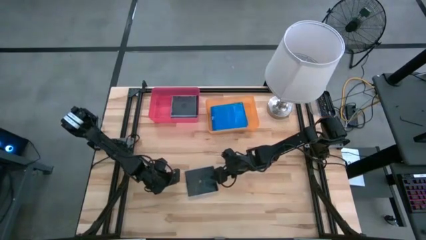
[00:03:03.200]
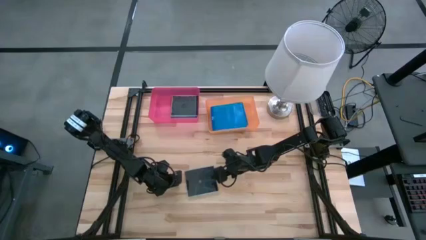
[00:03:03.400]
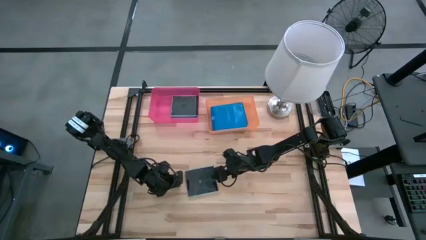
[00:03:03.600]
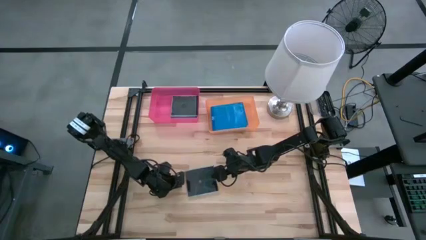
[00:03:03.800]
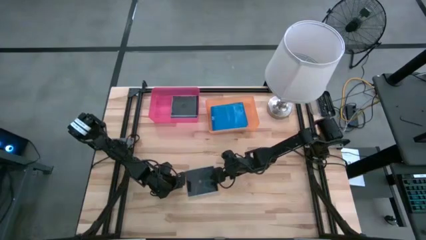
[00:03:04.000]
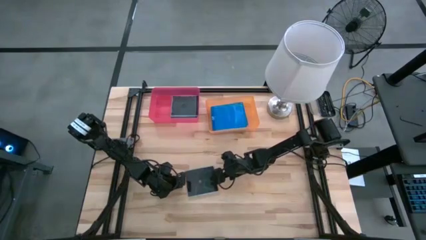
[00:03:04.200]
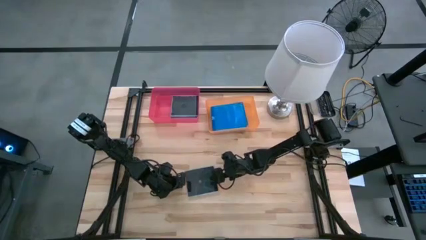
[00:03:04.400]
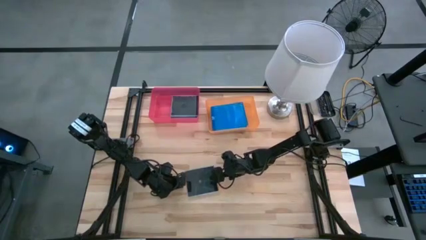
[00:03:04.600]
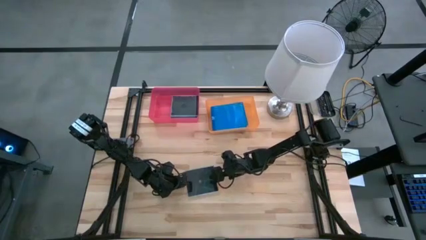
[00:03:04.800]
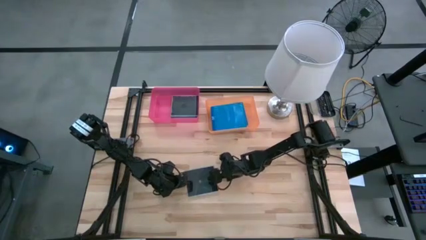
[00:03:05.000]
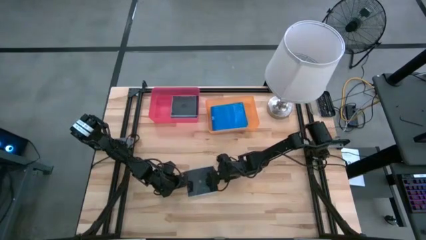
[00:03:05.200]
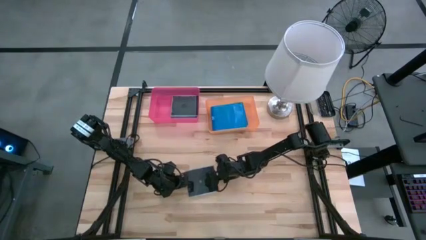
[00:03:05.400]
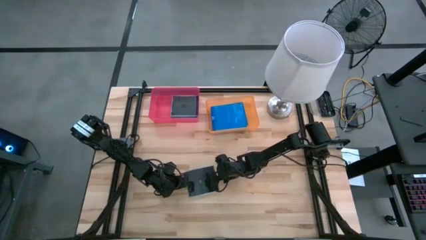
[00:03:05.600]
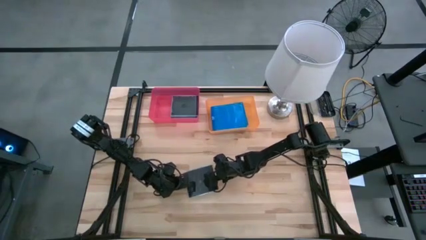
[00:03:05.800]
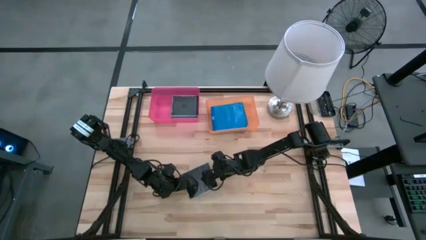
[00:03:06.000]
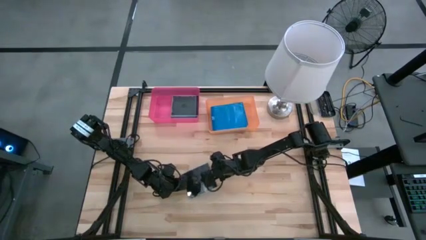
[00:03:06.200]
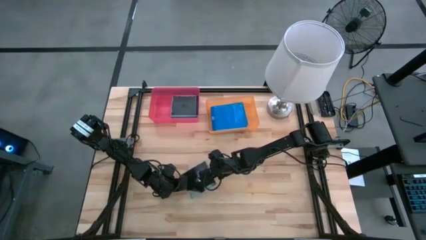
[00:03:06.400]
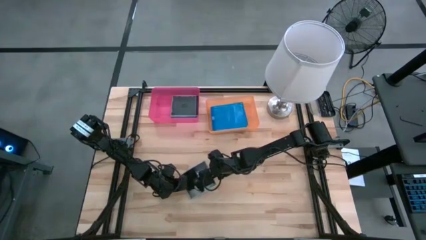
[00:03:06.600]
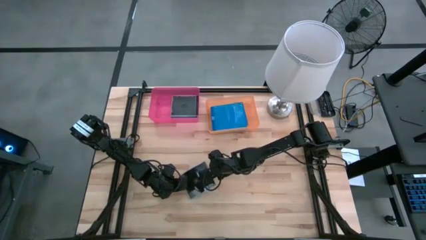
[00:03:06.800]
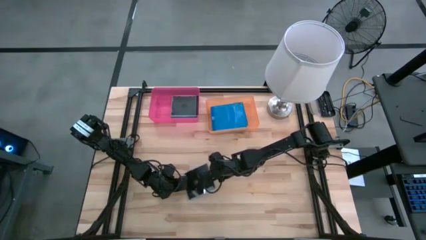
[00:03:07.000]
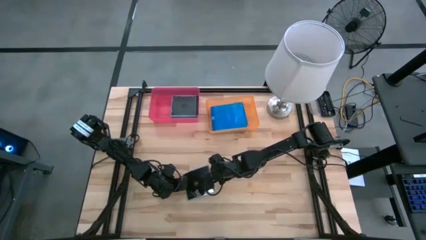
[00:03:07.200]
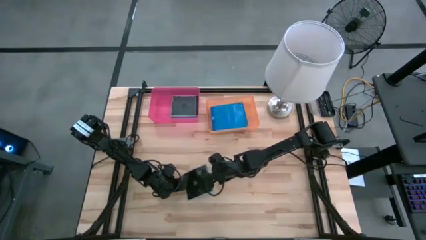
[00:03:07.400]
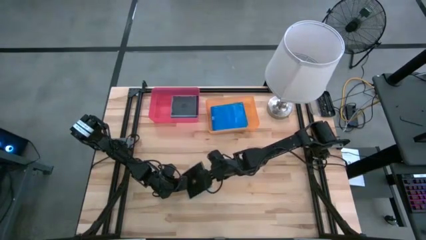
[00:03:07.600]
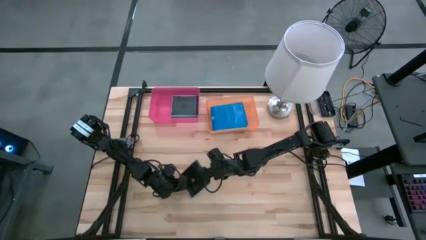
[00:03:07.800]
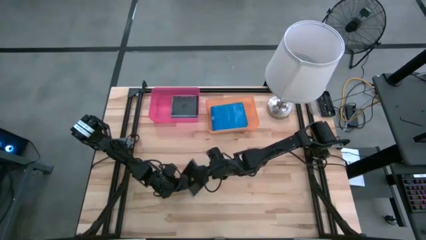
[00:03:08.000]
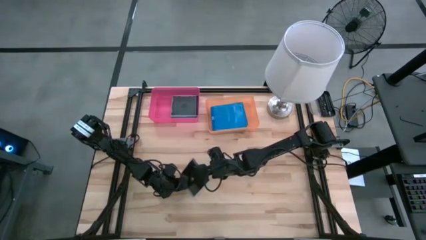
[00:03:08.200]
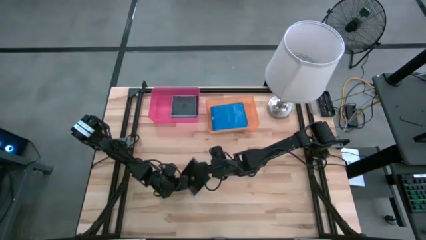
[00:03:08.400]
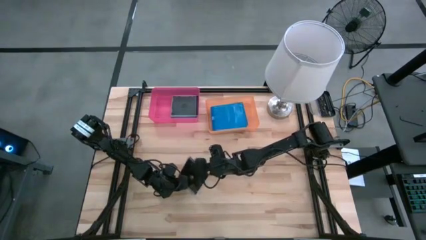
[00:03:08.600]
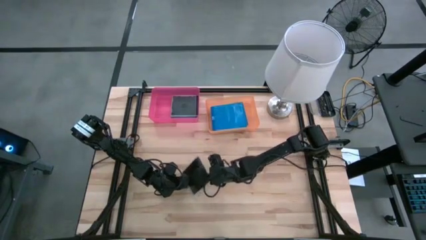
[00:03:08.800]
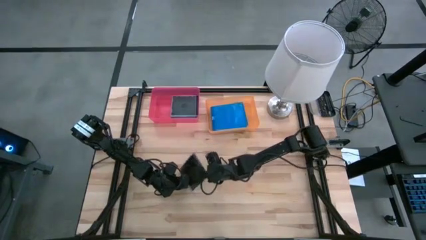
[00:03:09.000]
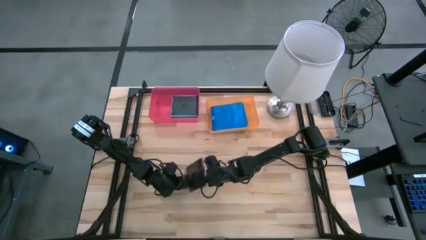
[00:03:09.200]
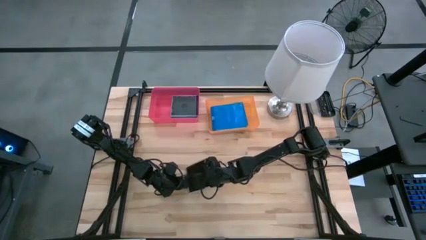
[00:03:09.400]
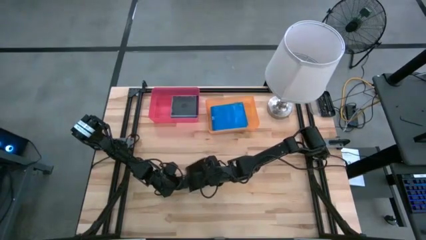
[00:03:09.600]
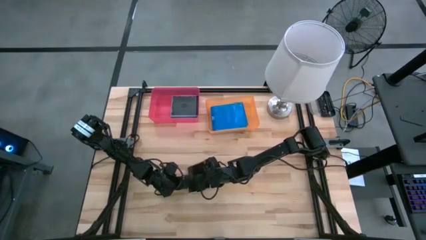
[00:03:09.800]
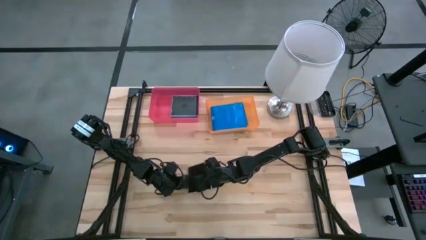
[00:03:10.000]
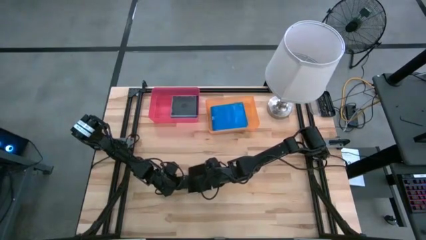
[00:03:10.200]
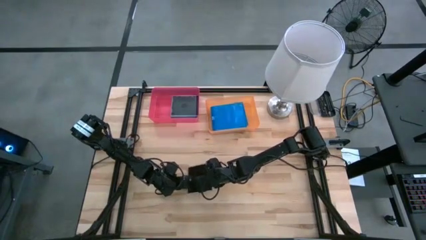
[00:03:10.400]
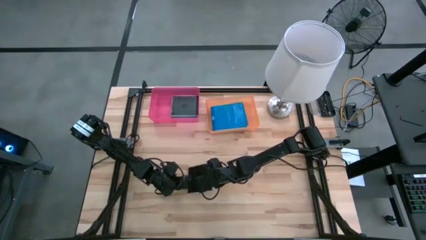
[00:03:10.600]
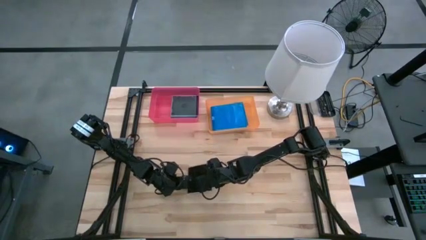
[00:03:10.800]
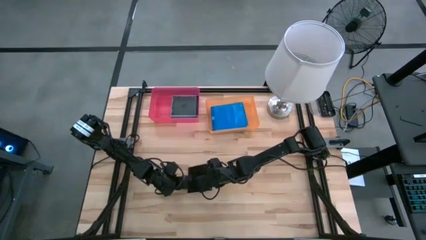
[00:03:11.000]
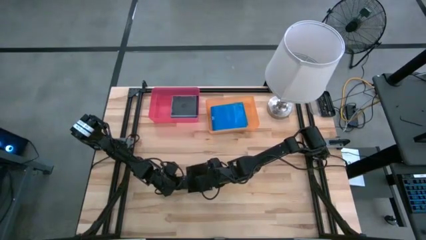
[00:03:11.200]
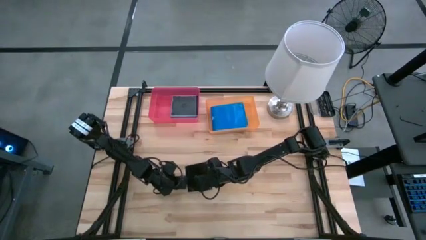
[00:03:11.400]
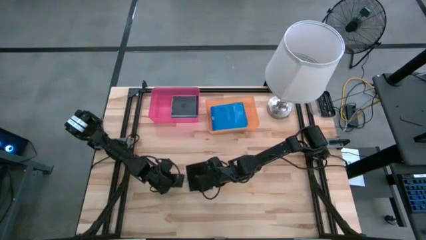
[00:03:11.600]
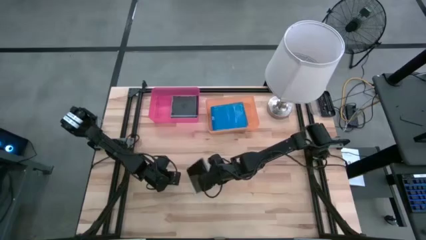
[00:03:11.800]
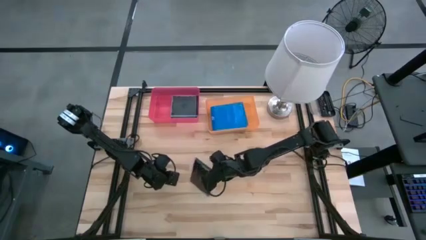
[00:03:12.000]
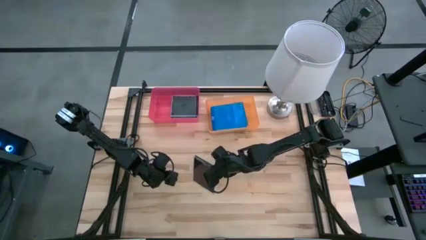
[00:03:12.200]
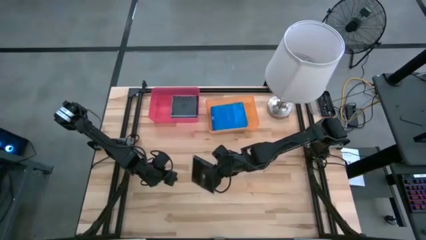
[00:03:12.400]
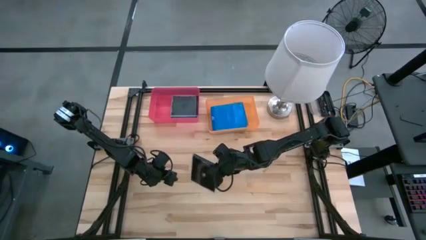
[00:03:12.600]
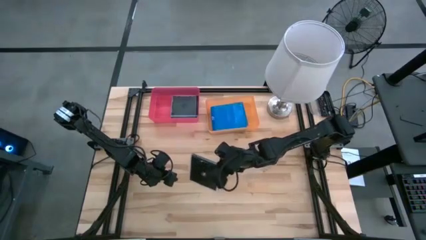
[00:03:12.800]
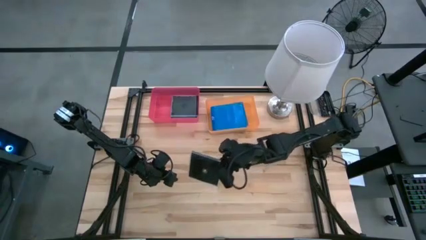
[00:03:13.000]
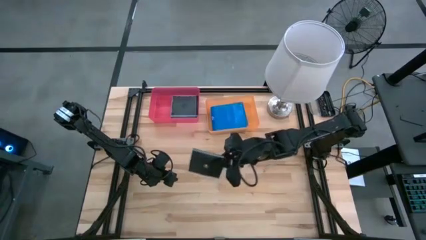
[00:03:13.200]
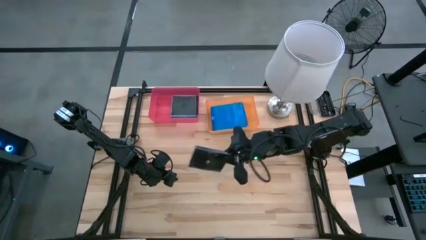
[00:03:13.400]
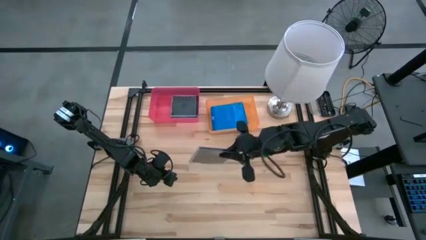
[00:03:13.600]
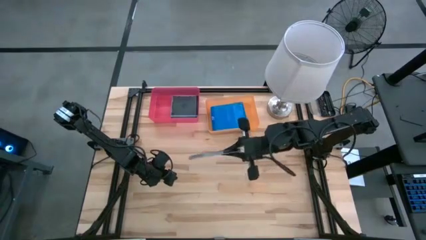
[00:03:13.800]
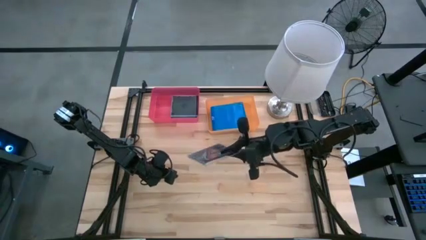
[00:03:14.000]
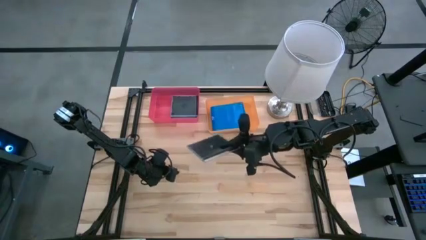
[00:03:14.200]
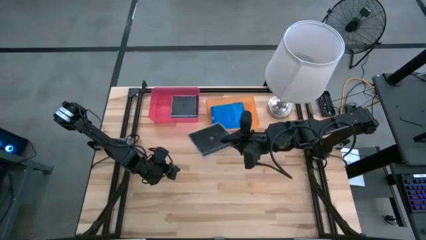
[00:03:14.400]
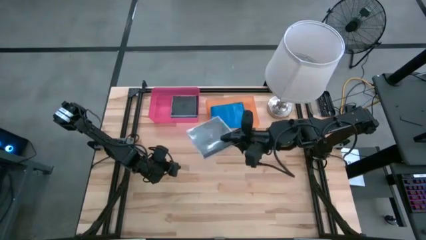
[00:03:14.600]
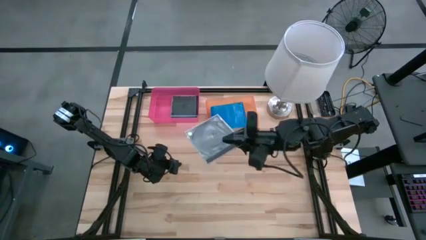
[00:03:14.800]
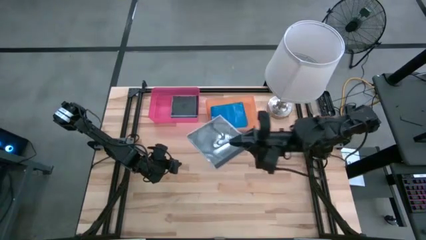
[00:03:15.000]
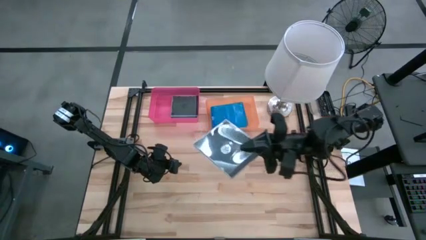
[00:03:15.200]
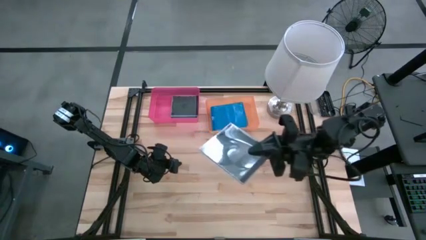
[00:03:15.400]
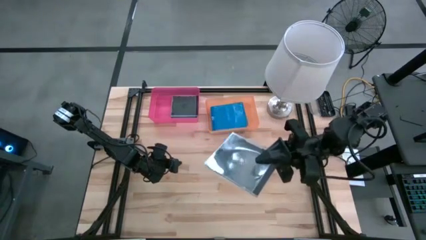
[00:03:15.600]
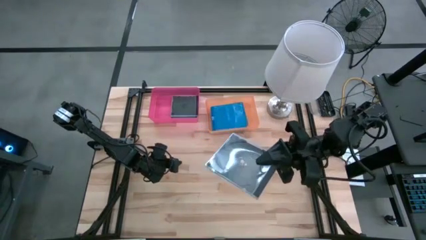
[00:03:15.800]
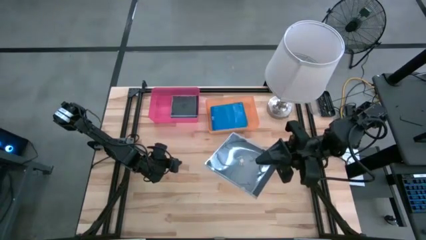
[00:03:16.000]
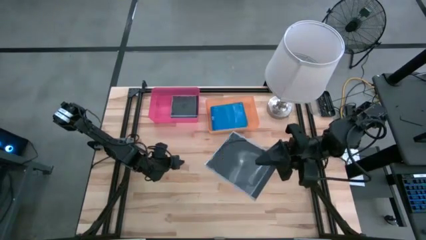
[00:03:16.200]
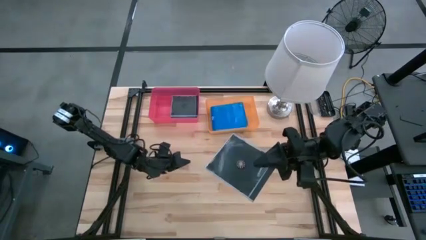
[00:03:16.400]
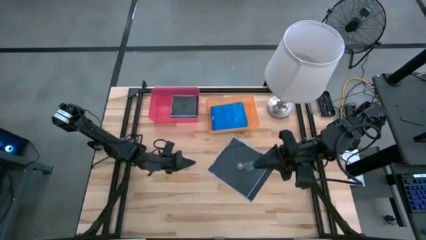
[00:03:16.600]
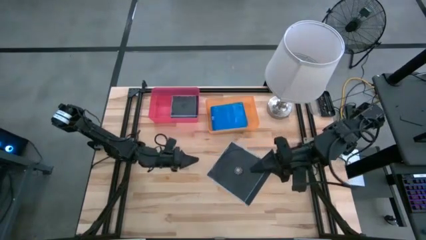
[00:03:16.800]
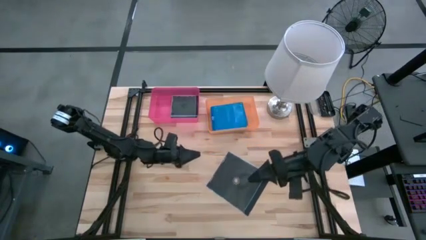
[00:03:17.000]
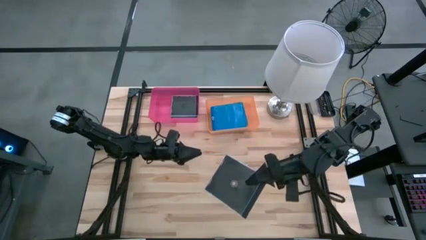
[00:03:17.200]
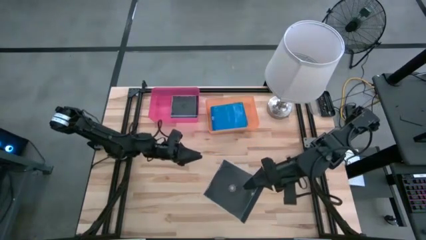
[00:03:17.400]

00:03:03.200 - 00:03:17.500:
Task: Pick & place jewel cases by type
Put the black CD case into the pink bin
